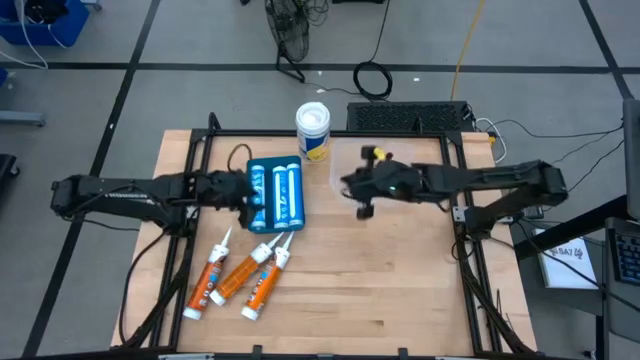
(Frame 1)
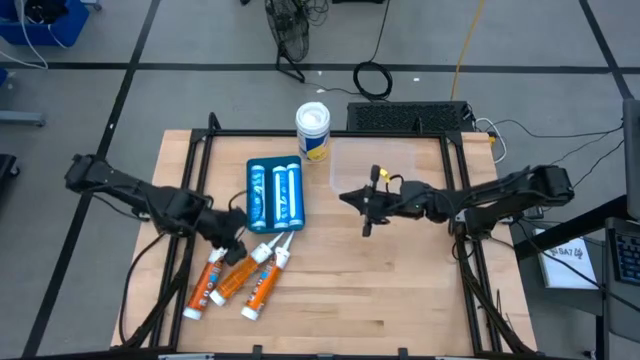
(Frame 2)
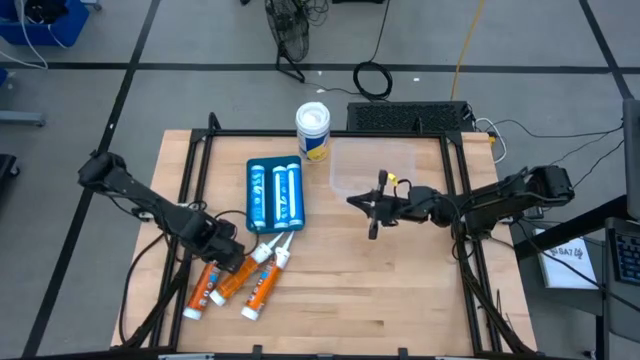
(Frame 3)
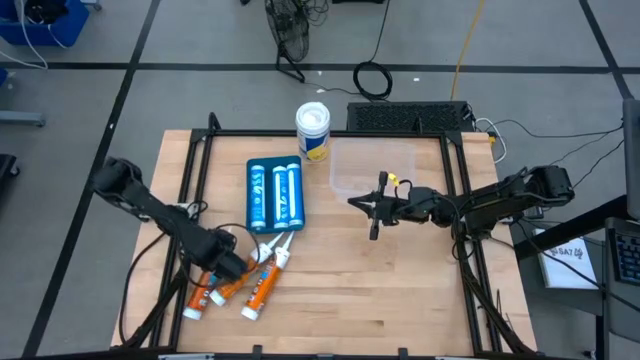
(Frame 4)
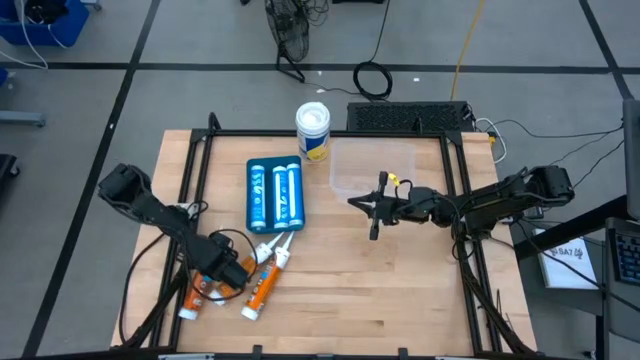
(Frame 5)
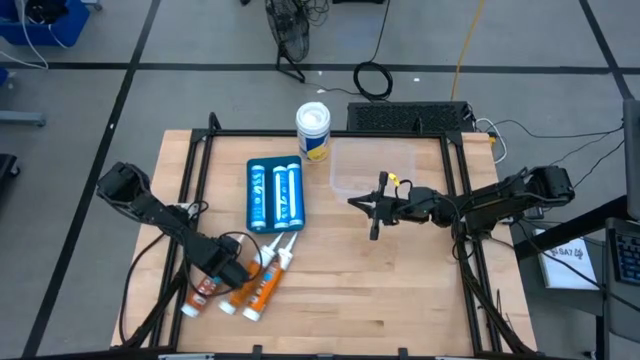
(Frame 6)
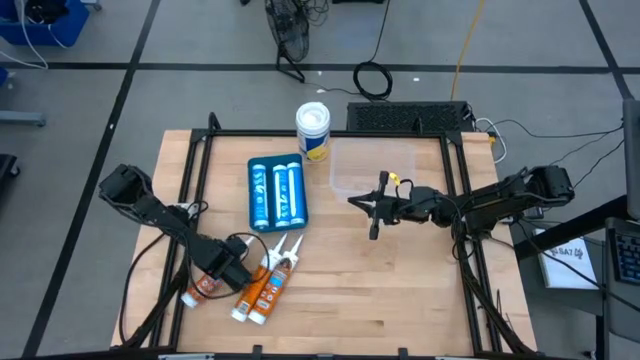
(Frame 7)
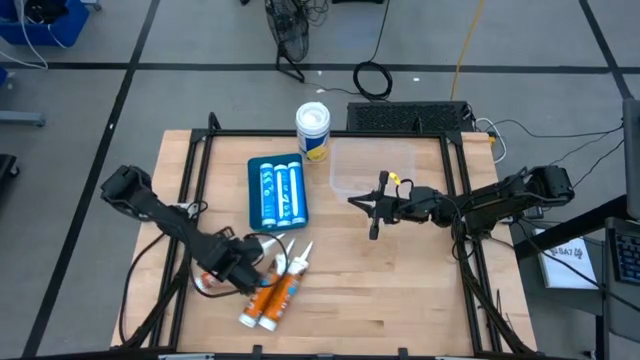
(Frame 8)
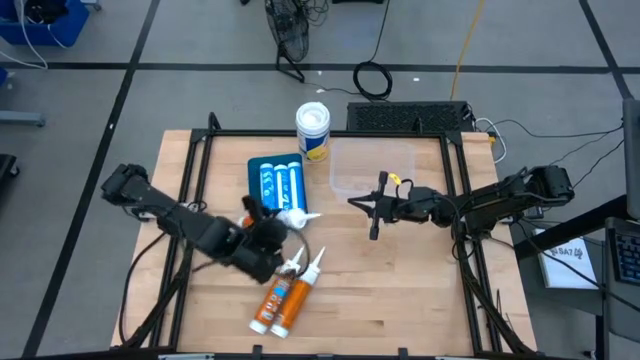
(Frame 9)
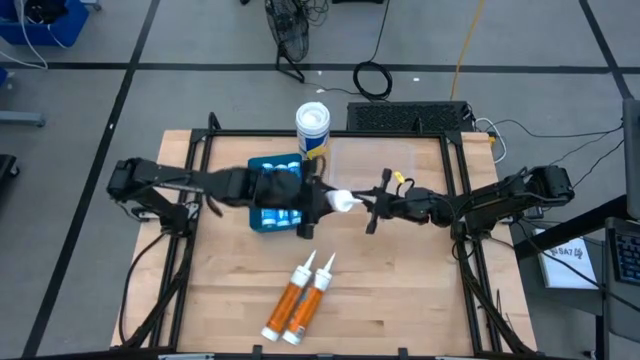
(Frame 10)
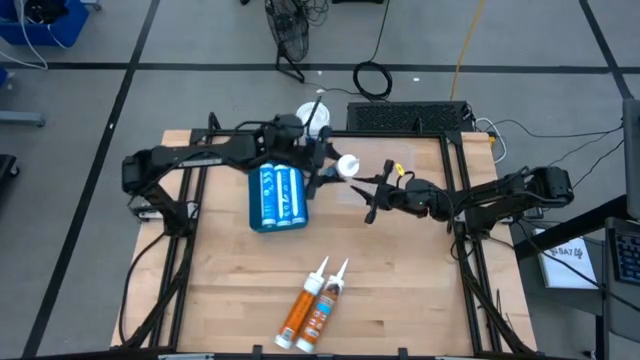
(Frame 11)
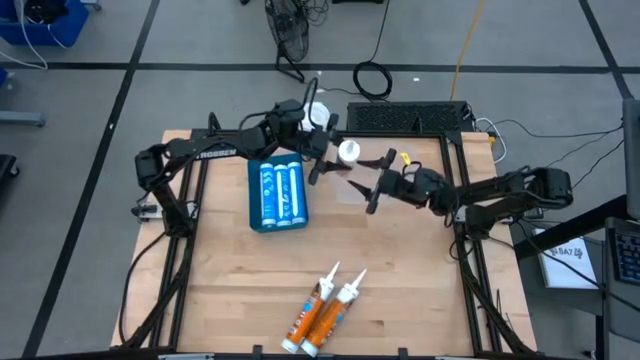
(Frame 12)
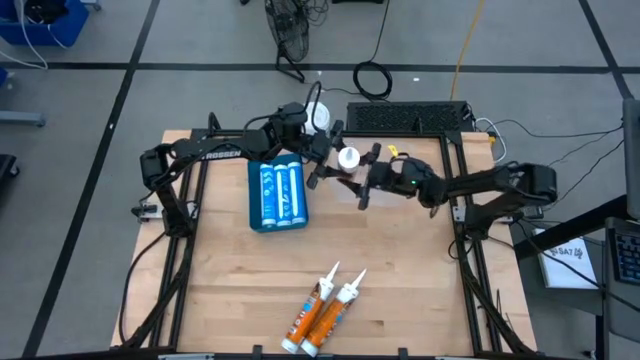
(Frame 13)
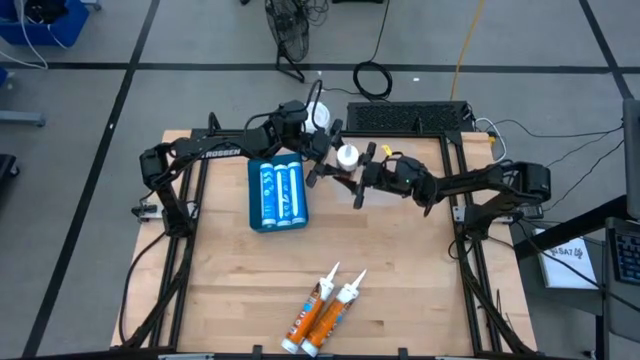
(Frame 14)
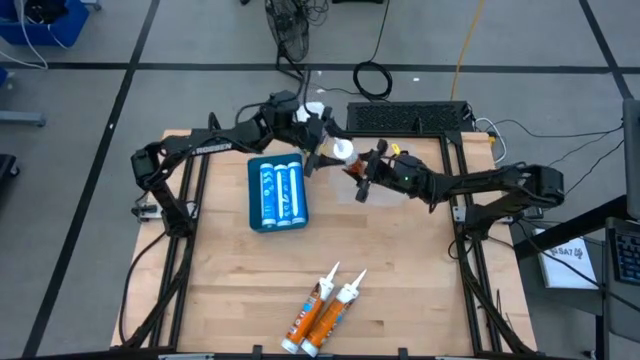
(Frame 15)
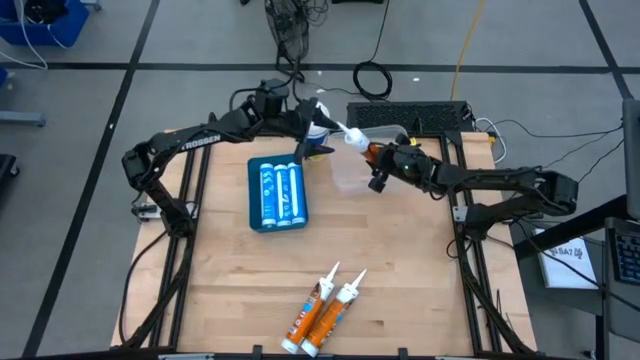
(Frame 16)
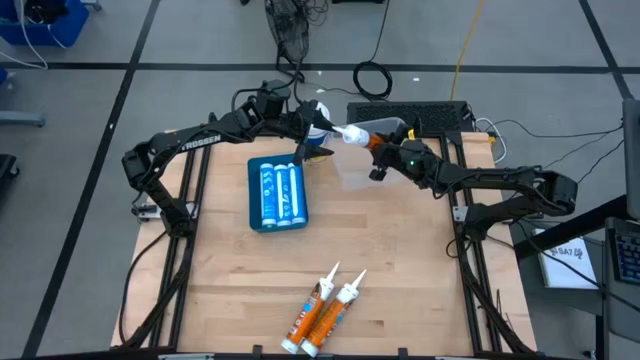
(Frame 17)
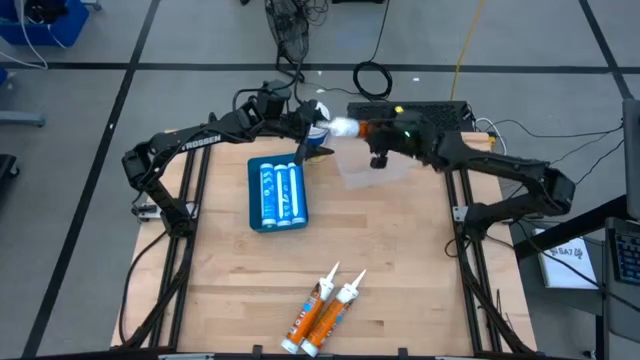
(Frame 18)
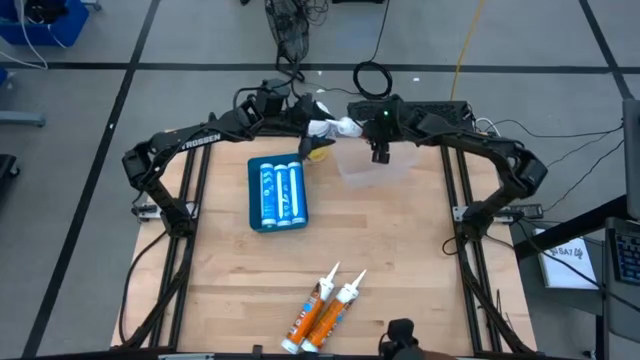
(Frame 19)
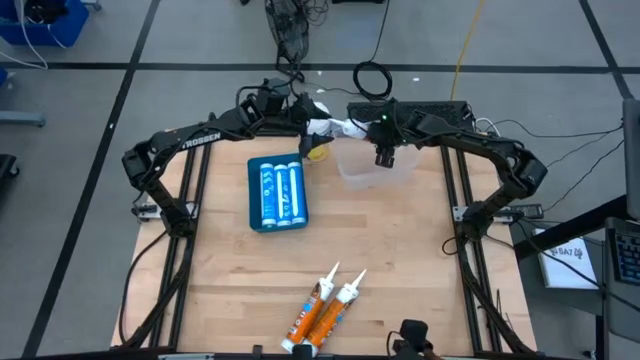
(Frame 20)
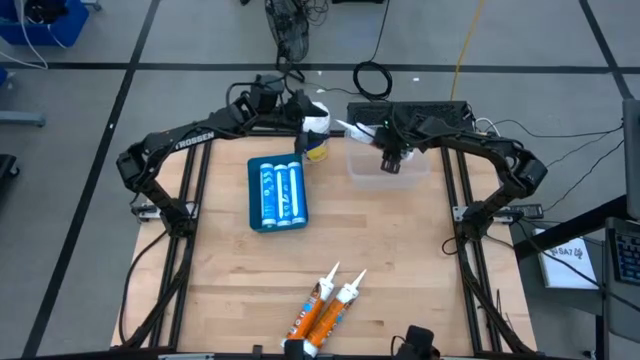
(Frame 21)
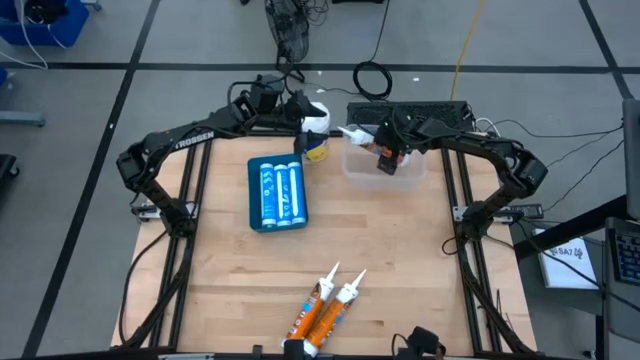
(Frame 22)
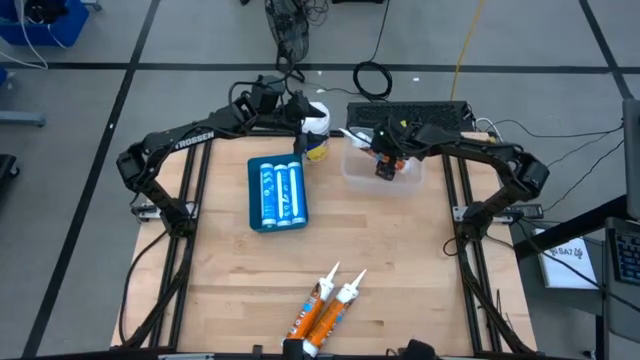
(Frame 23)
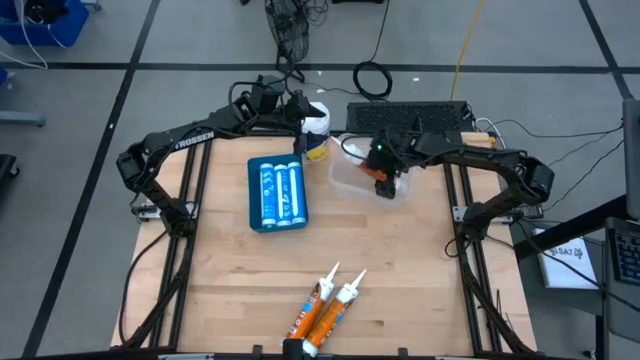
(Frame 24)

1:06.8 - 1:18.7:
Task: Pick & place silicon tubes, Sealant and Lysol wipes
Put the orange caulk tube into the transparent bin

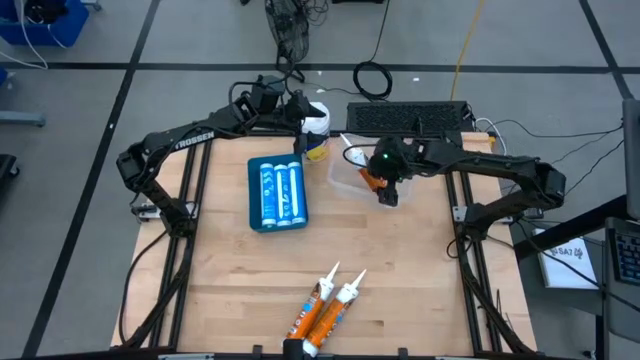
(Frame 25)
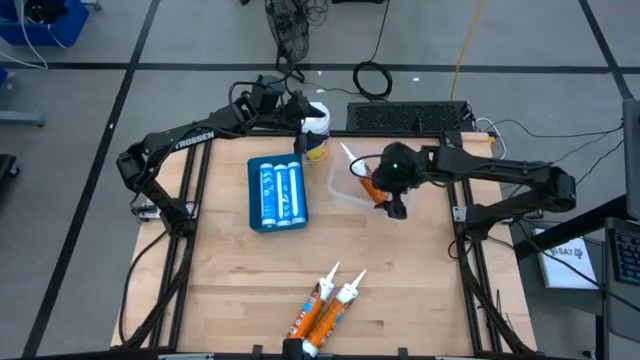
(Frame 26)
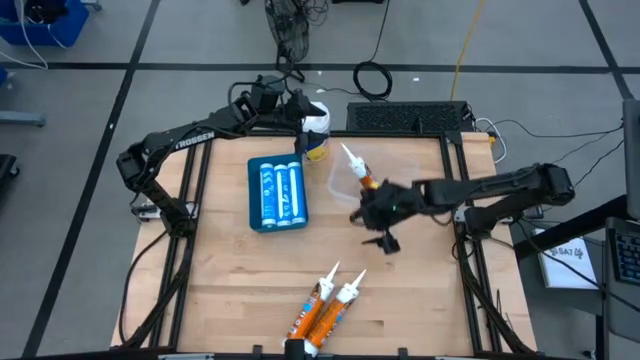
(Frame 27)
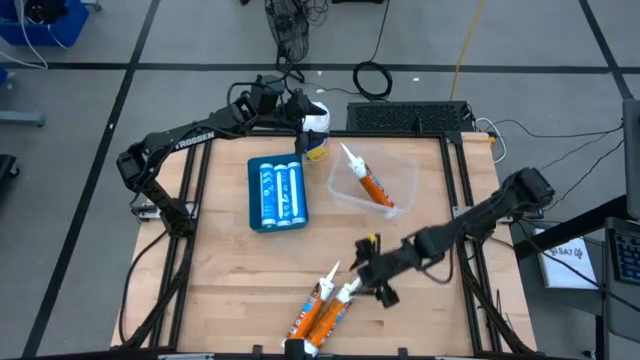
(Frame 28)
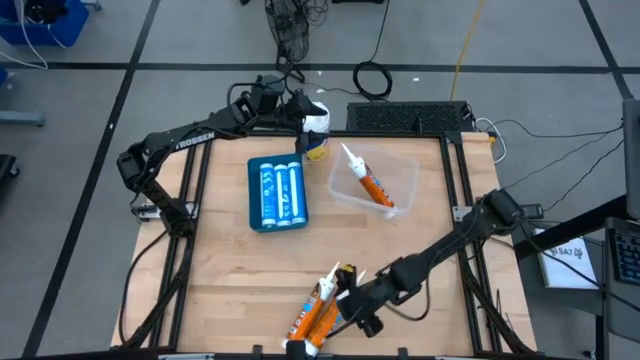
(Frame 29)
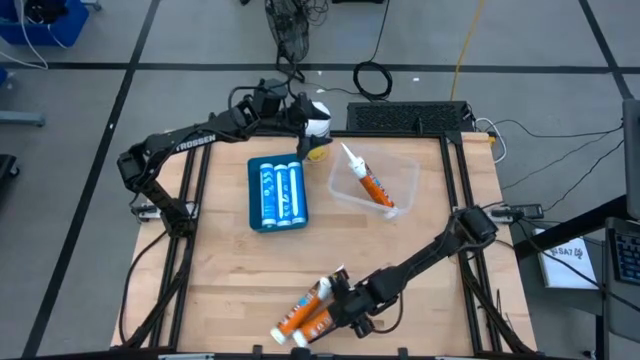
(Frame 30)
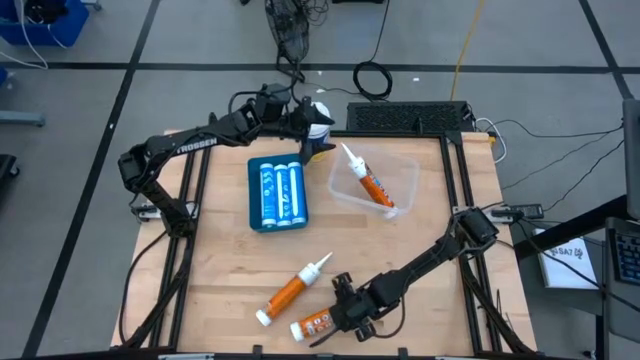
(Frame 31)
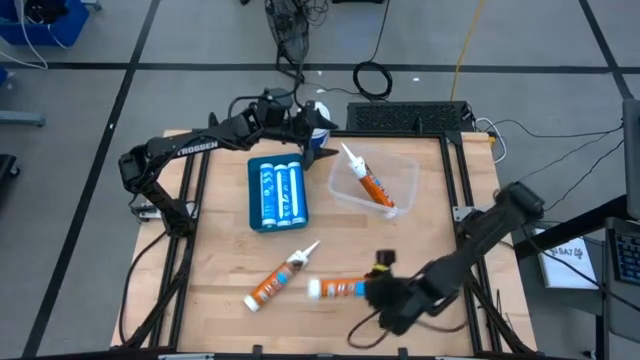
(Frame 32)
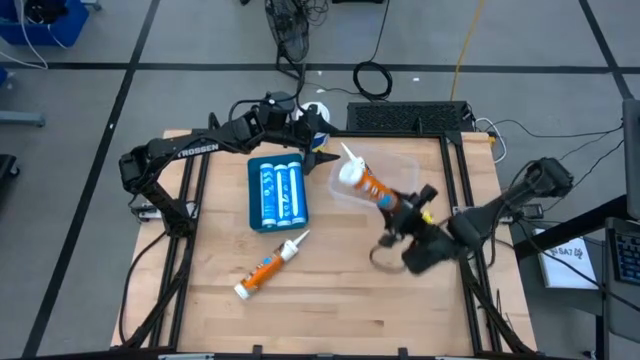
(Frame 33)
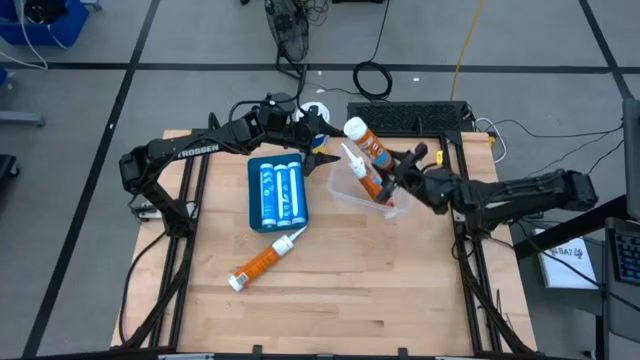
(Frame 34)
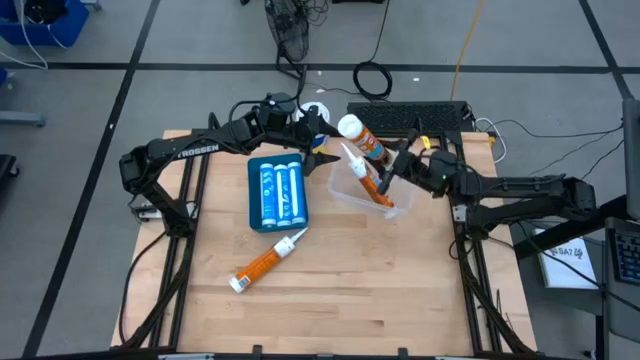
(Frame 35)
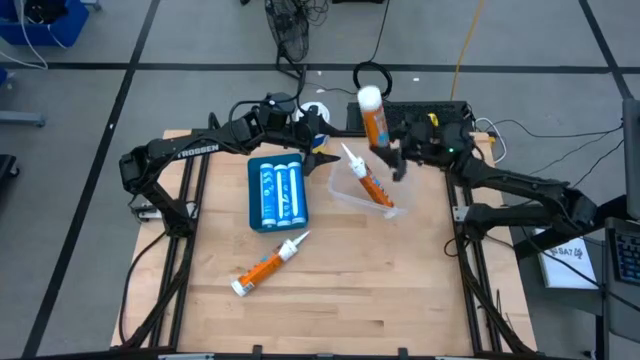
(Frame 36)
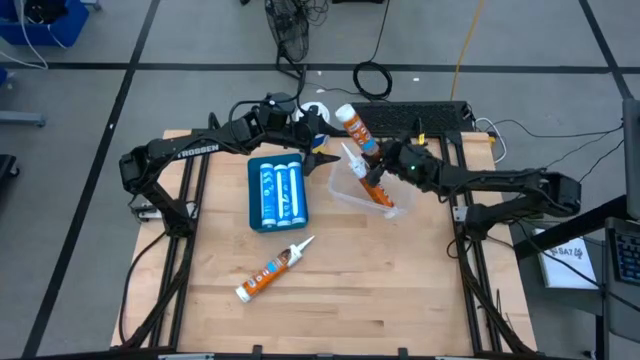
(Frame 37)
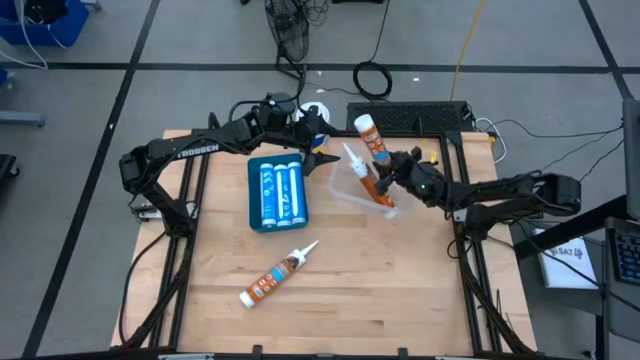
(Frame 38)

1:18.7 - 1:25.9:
Put the orange caulk tube into the transparent bin

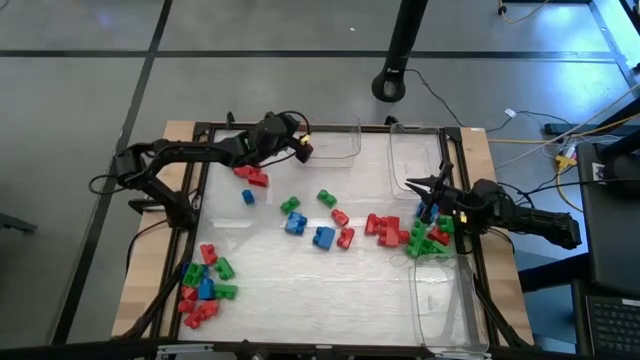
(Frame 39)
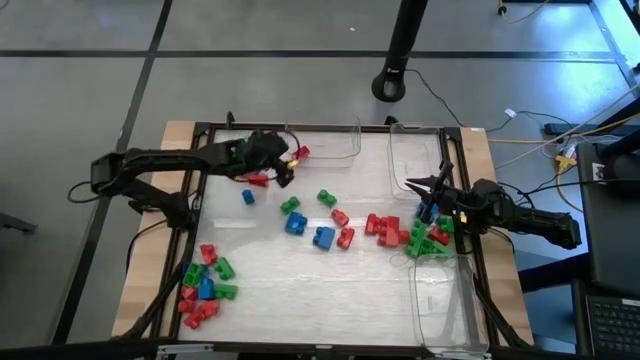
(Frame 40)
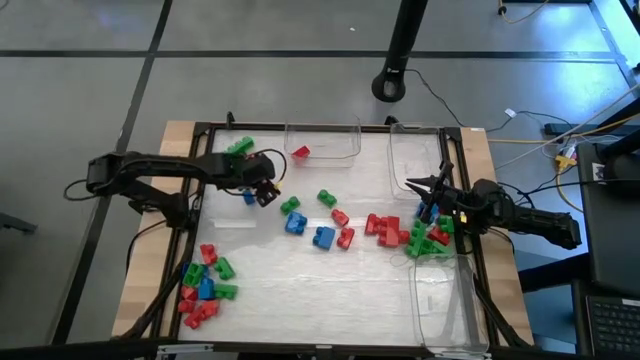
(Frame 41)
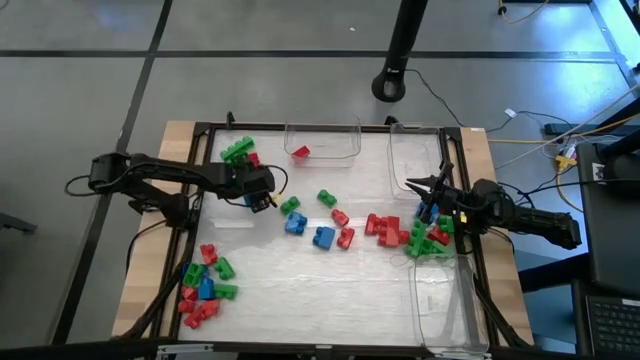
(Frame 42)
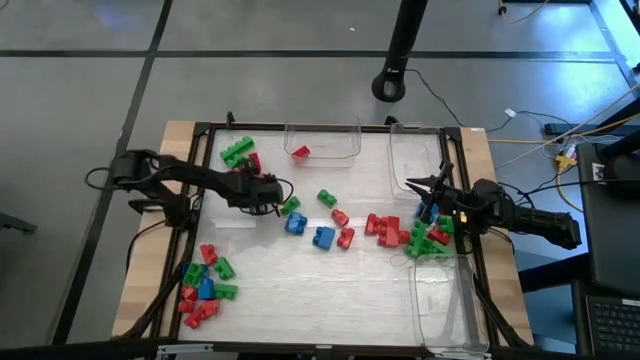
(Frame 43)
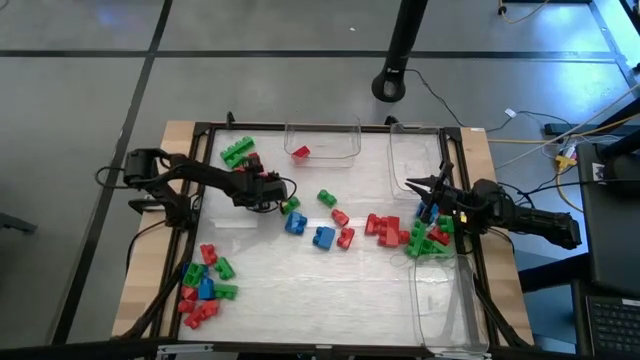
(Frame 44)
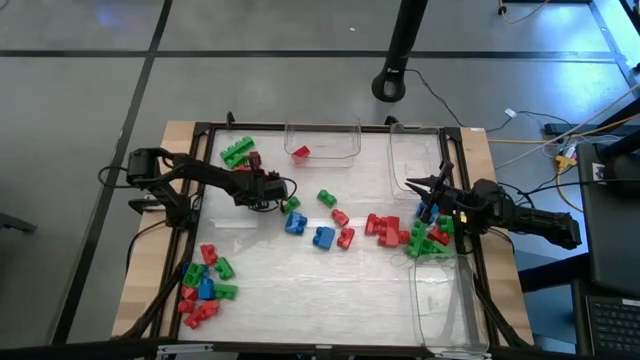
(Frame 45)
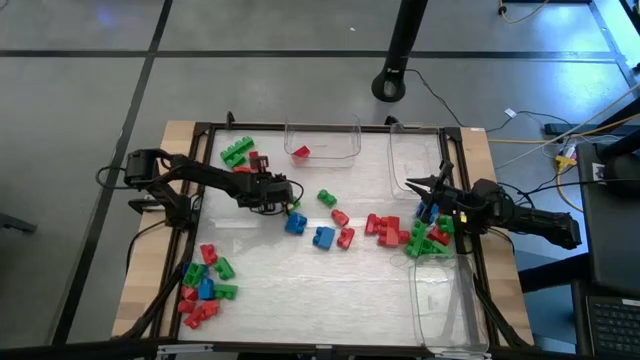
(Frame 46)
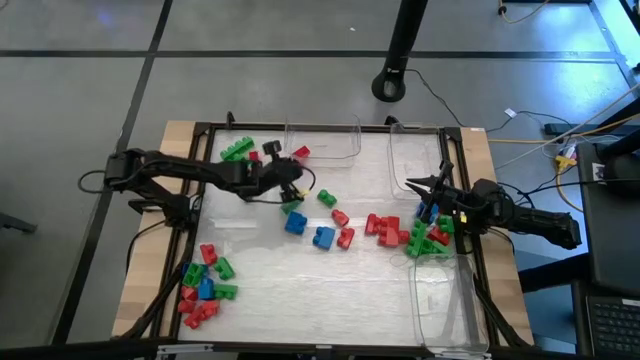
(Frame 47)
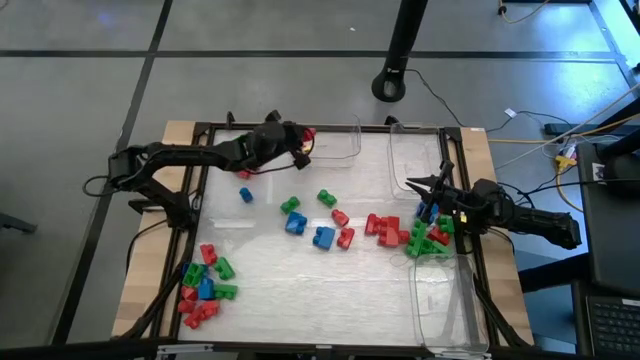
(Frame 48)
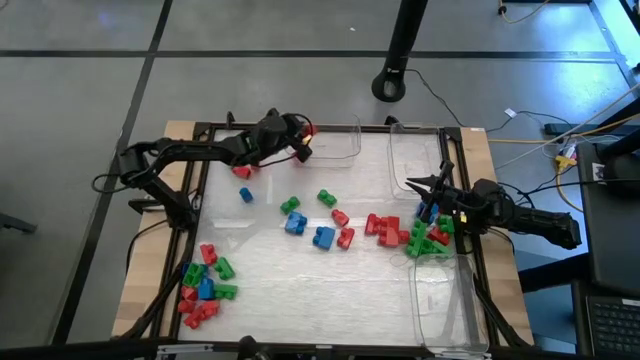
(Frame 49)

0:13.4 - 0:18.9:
Task: Sort blocks
Put the red game piece into the top left transparent bin
